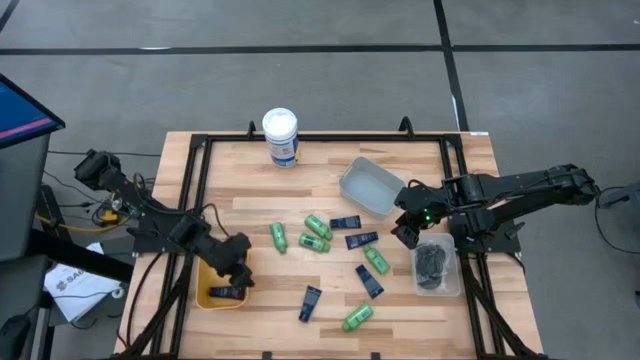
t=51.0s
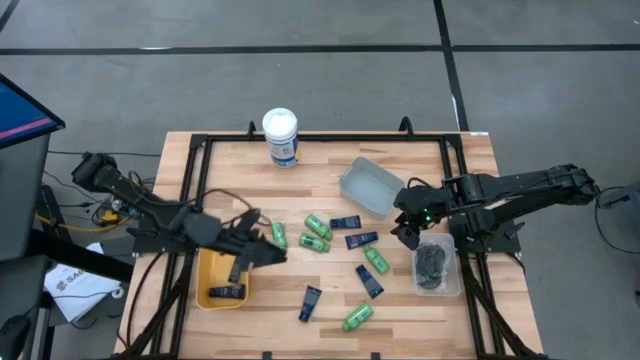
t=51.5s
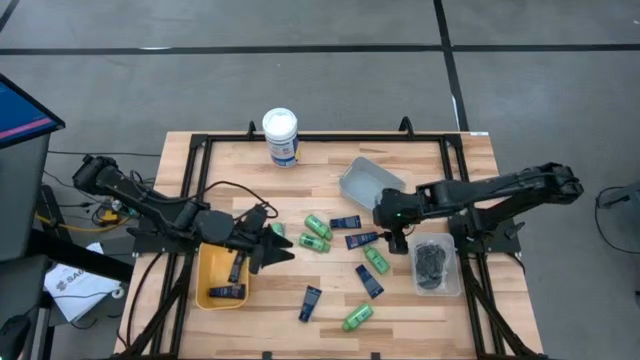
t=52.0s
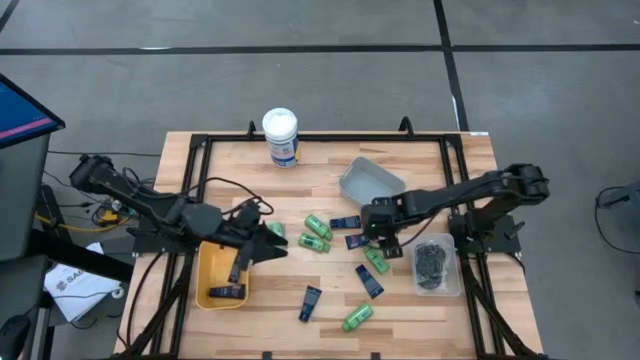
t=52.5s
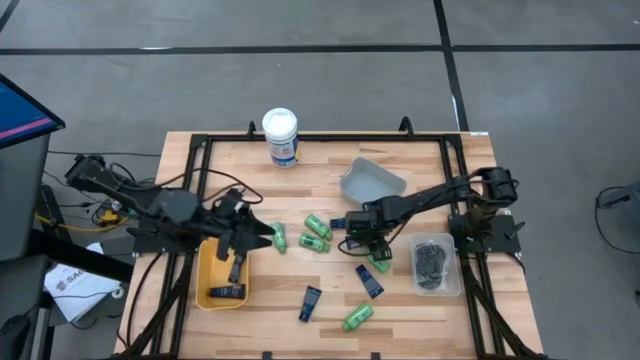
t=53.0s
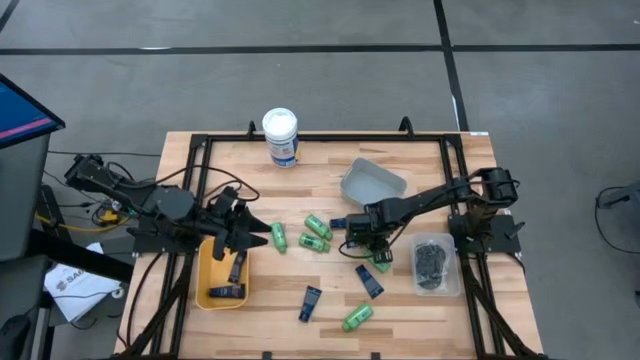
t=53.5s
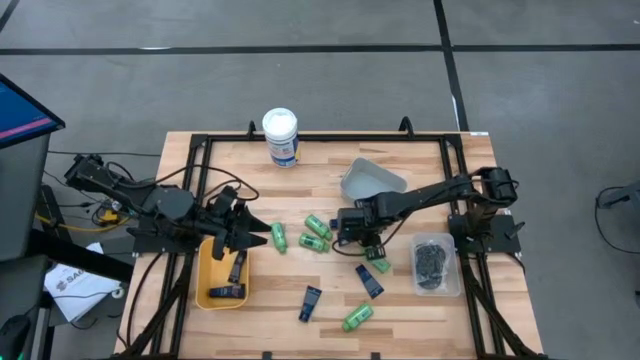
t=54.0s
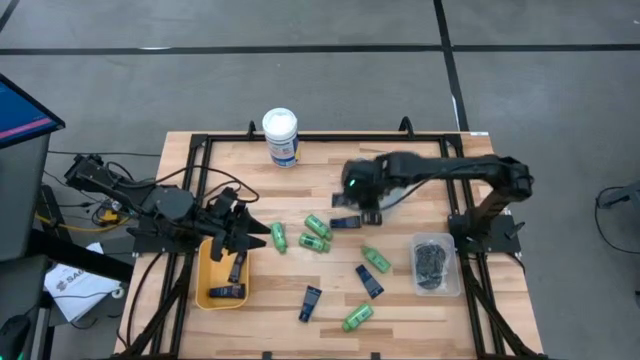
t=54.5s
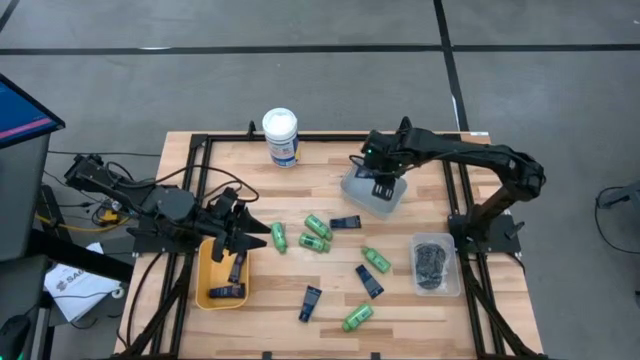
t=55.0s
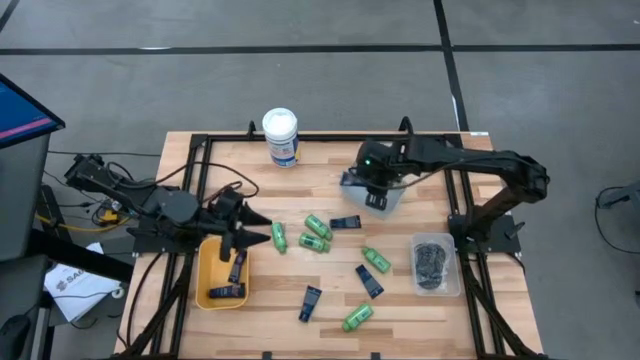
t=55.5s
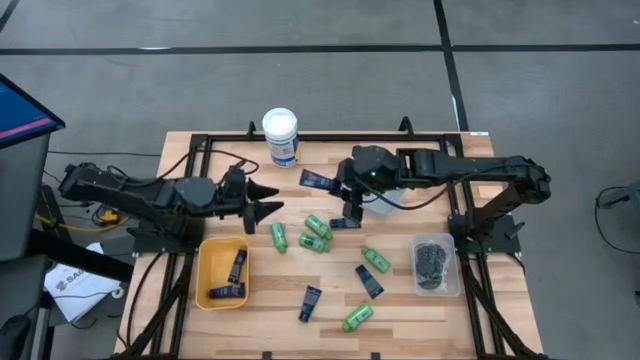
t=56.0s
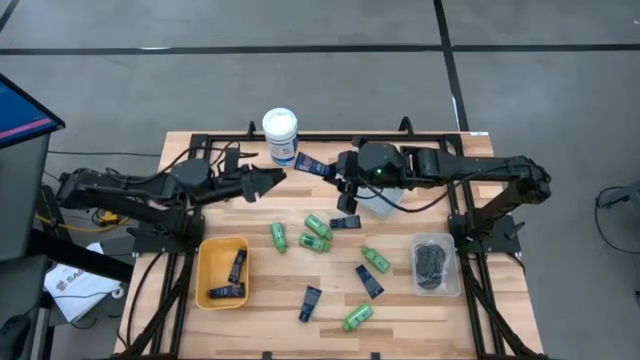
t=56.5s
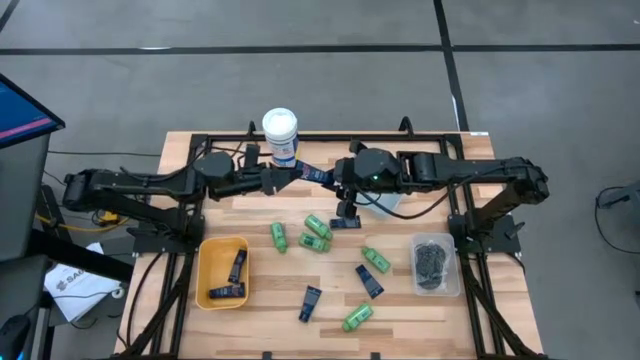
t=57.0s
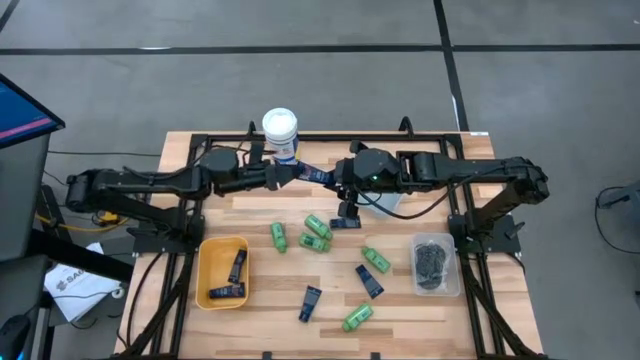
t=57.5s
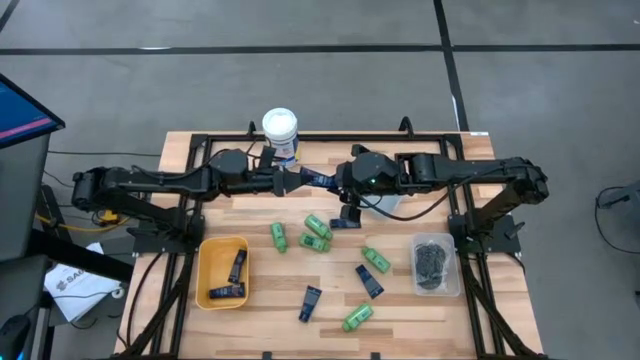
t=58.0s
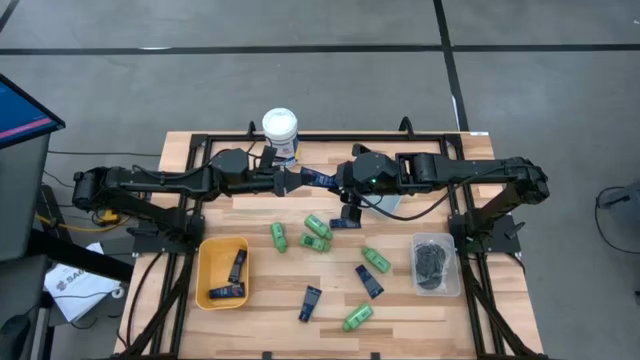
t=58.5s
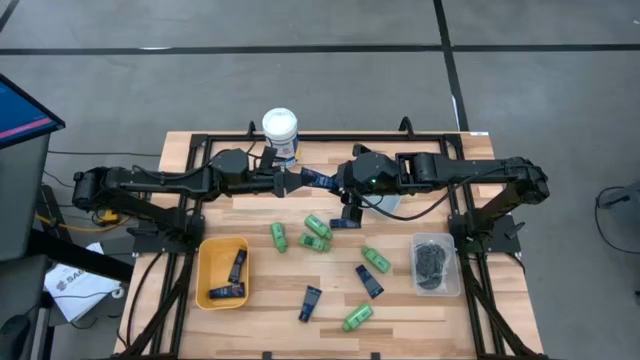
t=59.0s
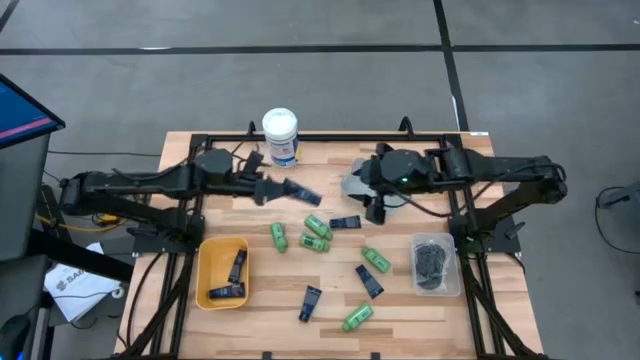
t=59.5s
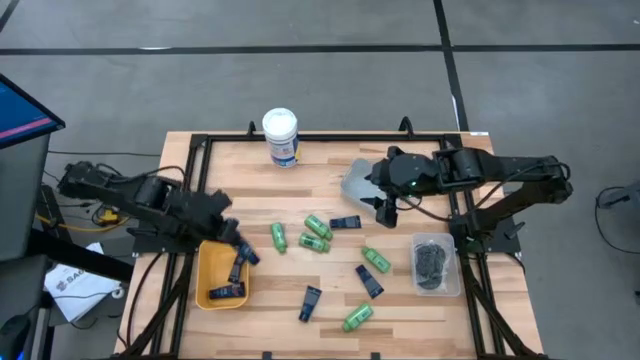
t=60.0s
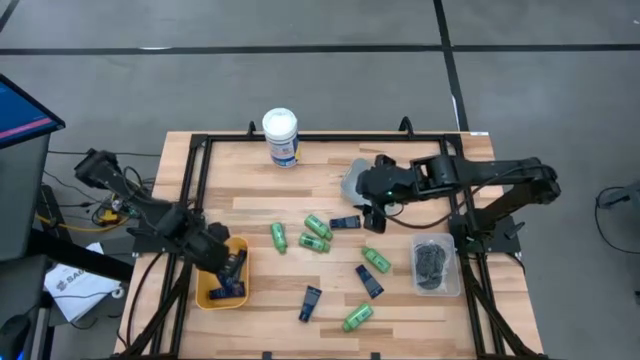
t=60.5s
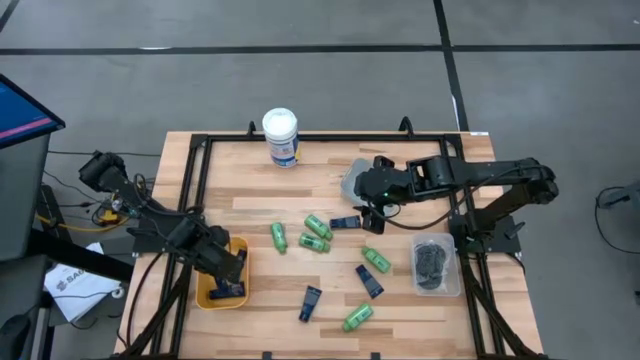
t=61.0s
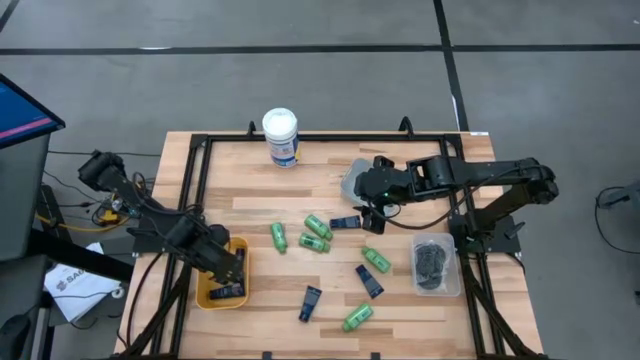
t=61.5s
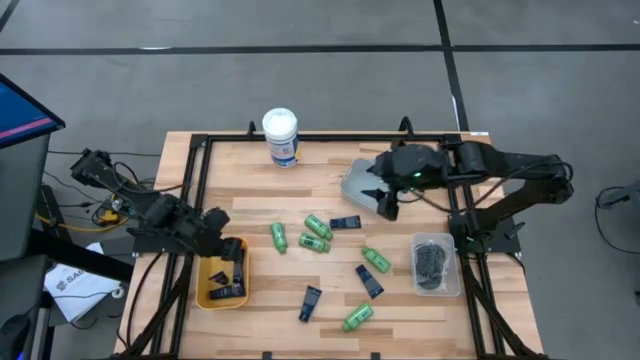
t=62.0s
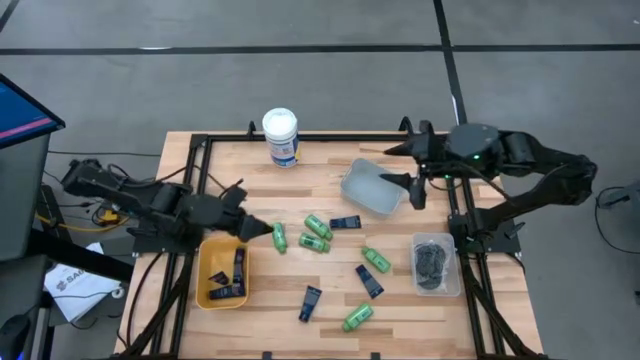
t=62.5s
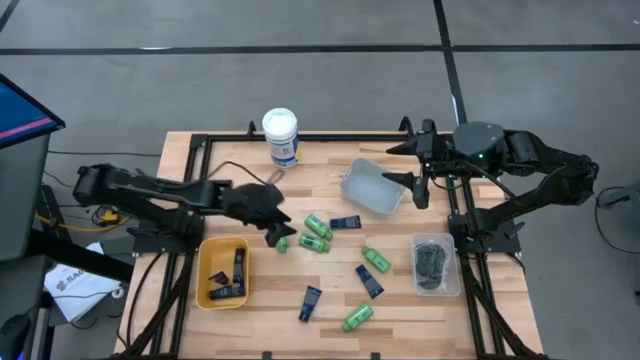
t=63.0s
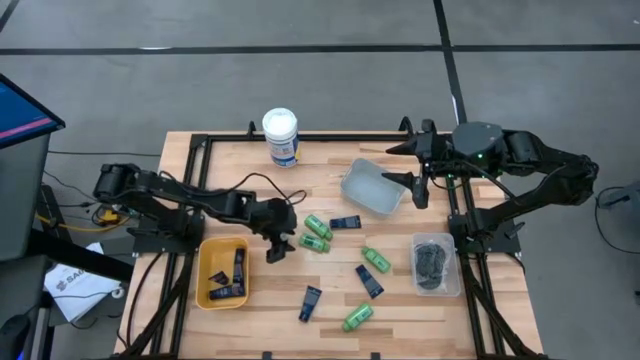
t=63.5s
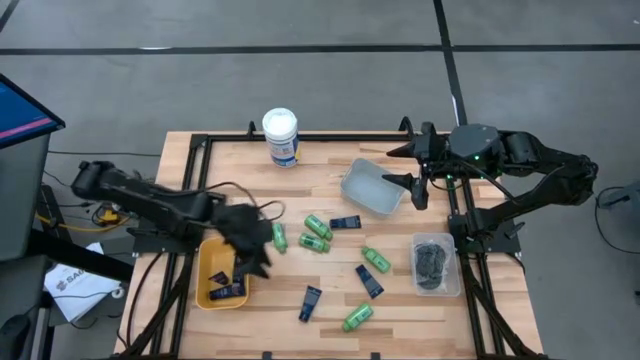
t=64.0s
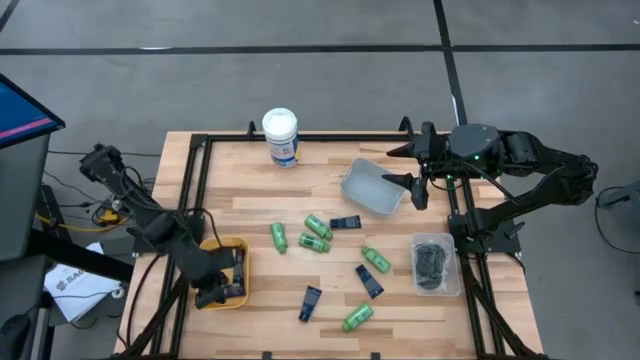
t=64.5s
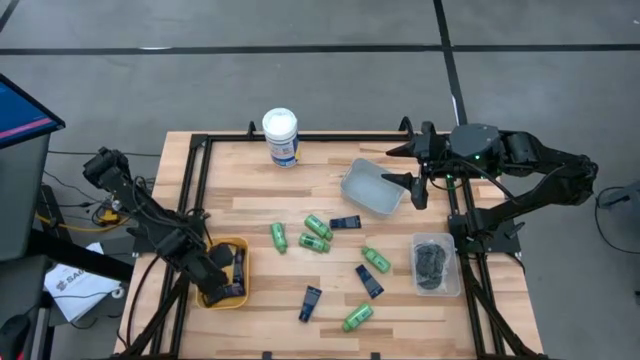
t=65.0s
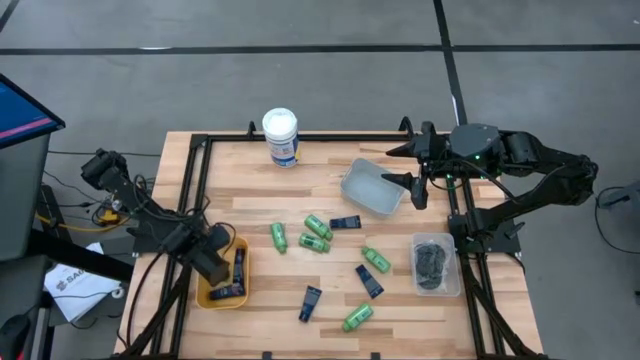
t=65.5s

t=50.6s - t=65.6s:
Task: Pick & Place Travel size toiletries
Put the blue shave cream into the light orange bin

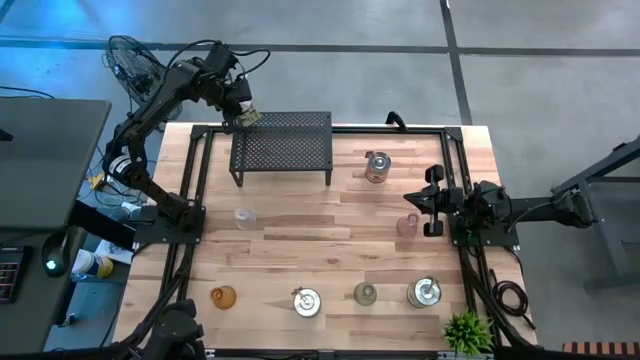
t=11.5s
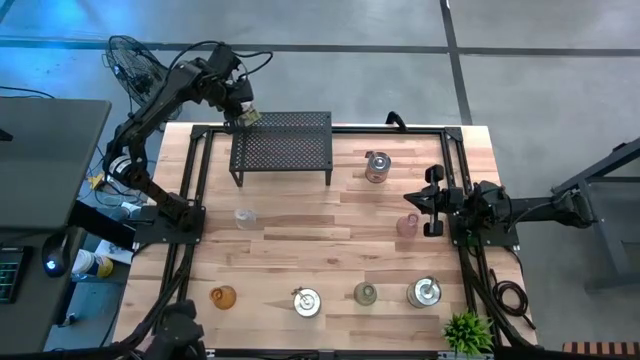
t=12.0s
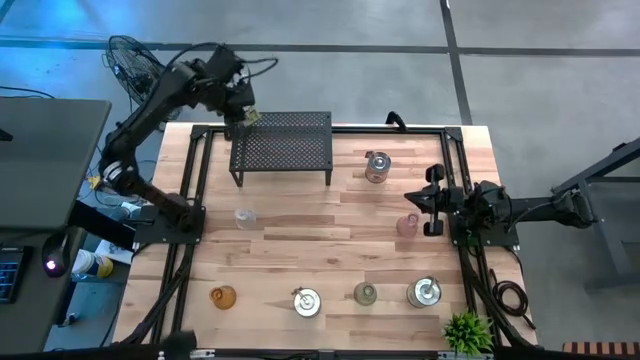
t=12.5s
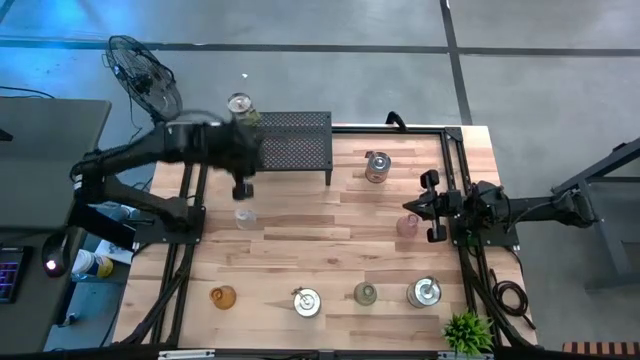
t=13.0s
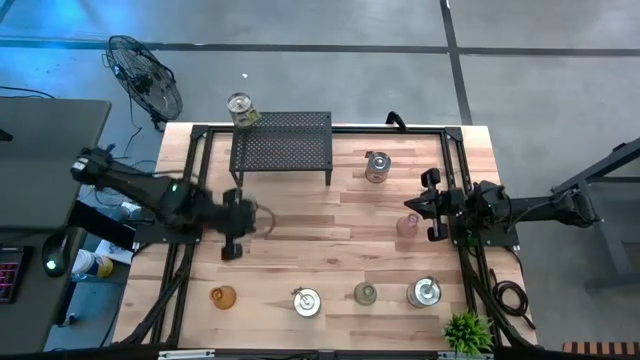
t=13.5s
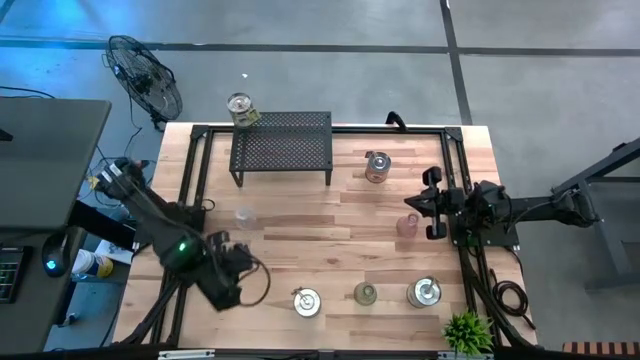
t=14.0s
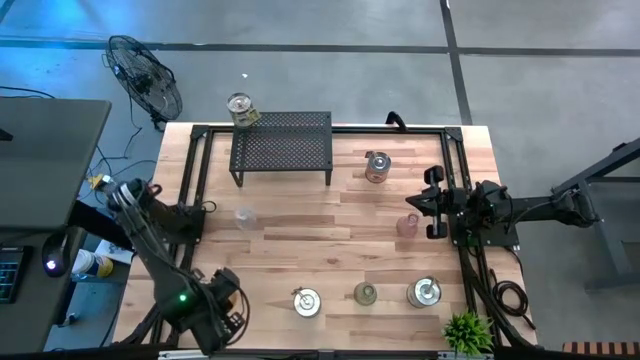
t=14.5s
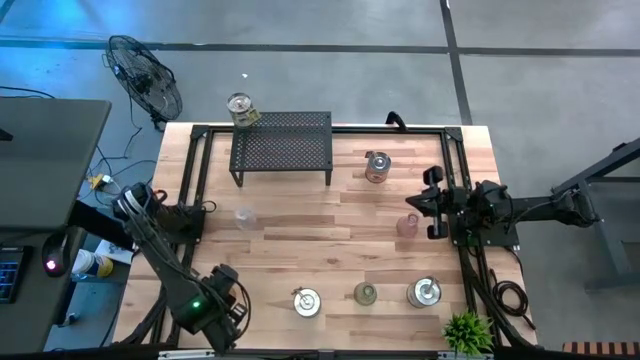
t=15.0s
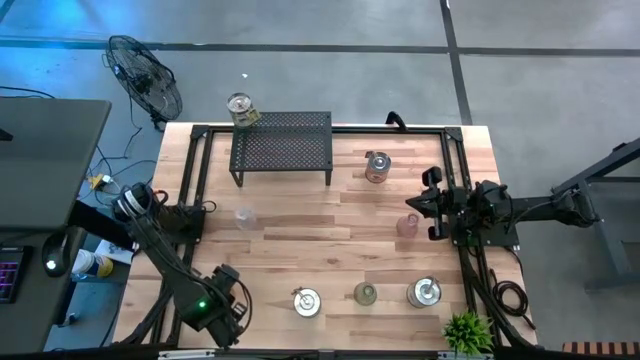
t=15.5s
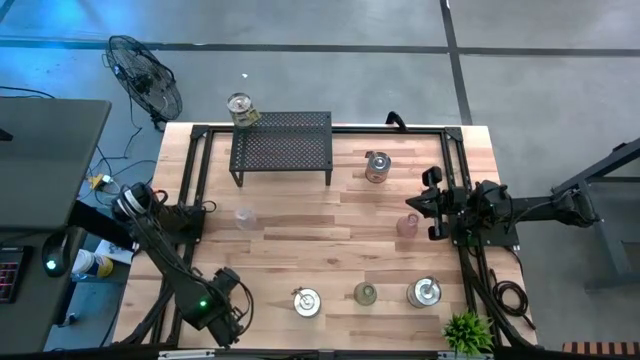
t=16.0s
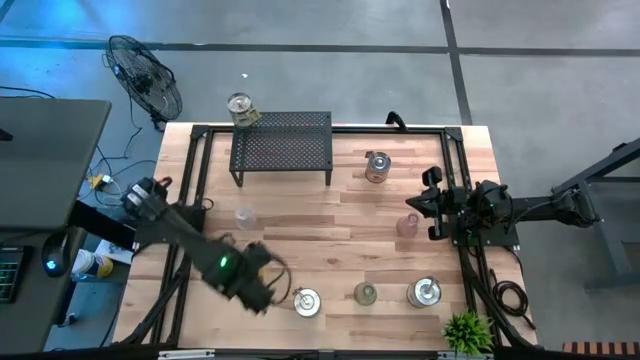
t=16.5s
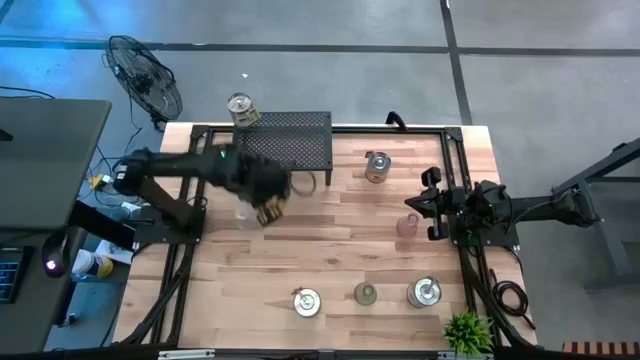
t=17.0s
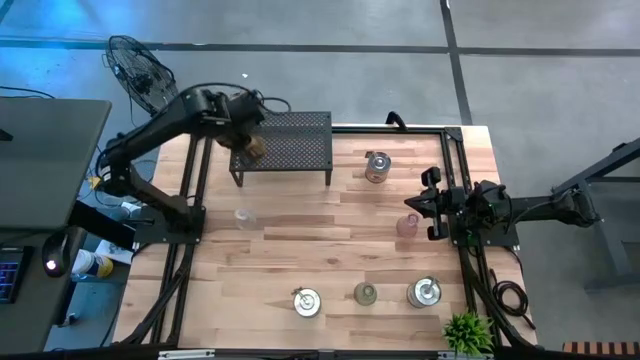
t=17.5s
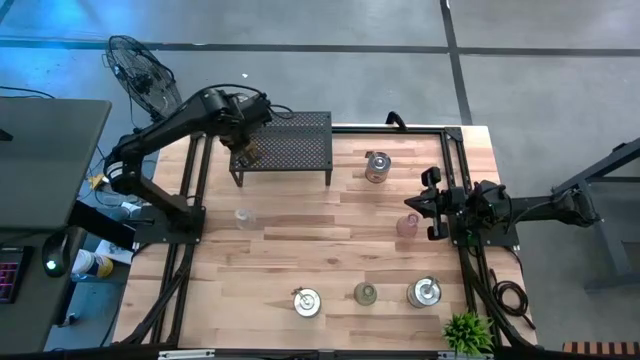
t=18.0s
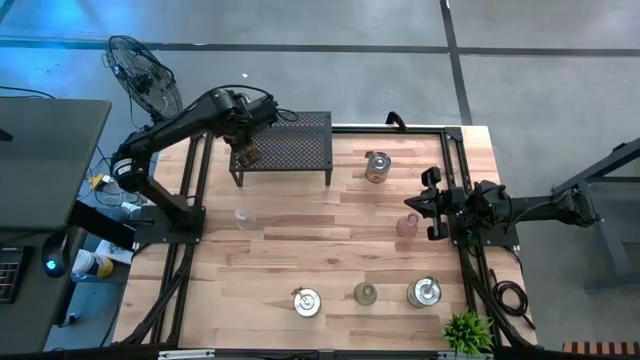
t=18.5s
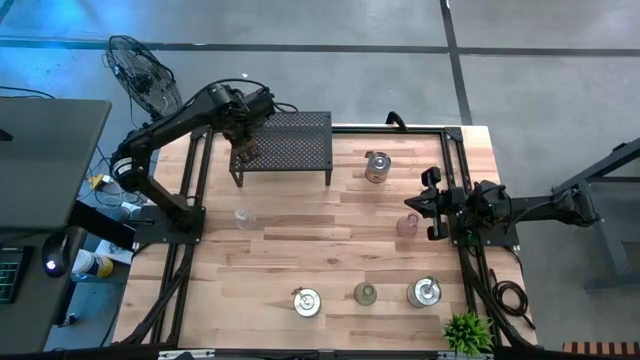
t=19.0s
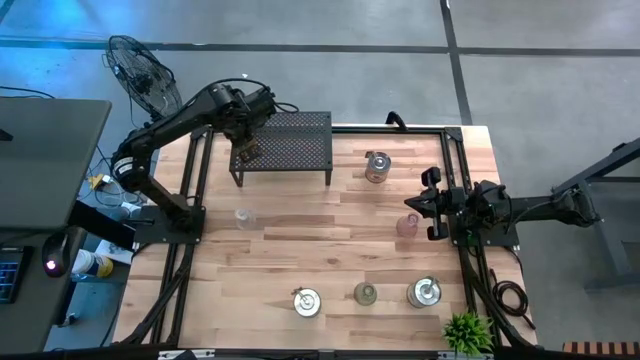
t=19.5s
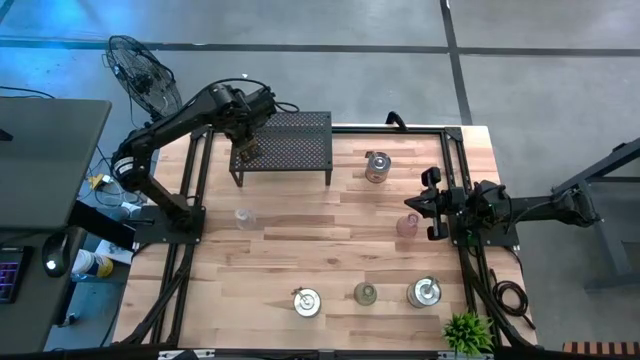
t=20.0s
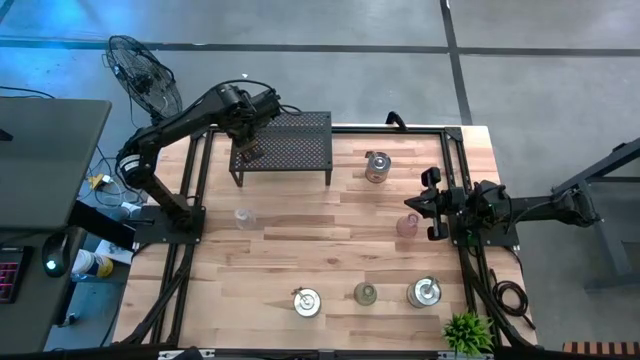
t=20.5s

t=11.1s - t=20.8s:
Task: Pick & Place candle stick holders
Put the yellow candle holder on the shelf aligned with the green scented candle
